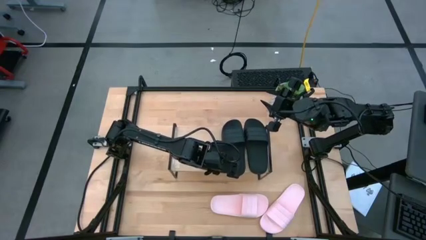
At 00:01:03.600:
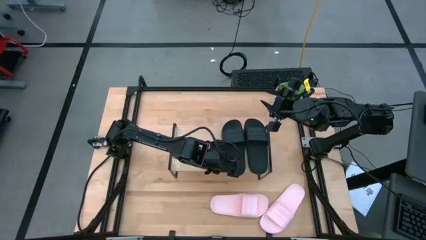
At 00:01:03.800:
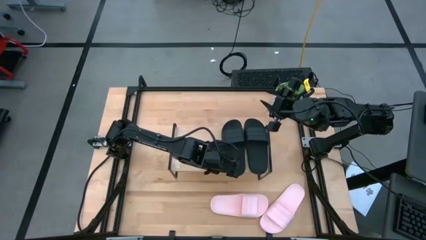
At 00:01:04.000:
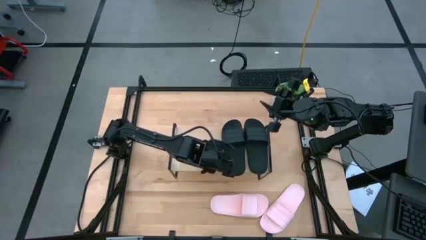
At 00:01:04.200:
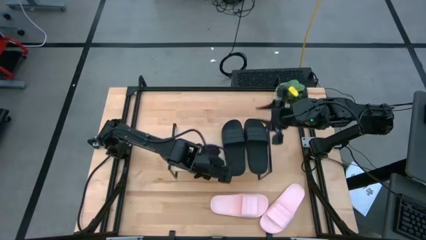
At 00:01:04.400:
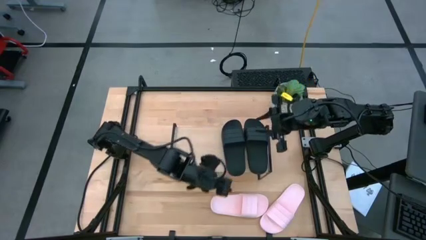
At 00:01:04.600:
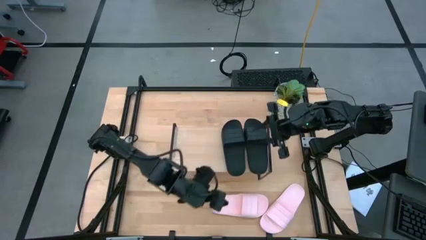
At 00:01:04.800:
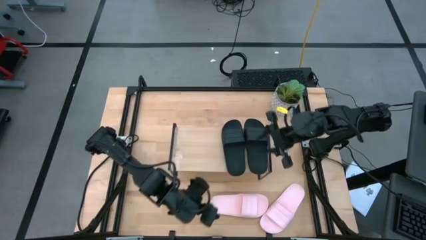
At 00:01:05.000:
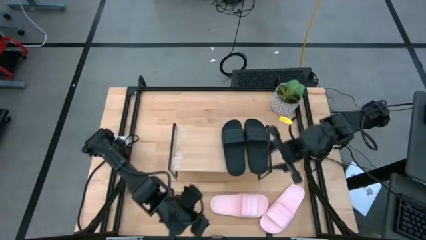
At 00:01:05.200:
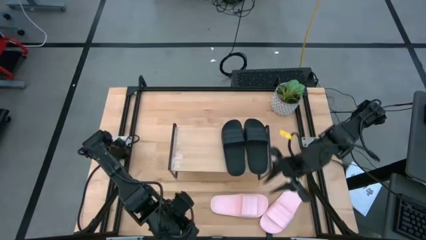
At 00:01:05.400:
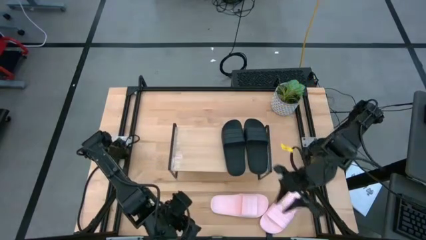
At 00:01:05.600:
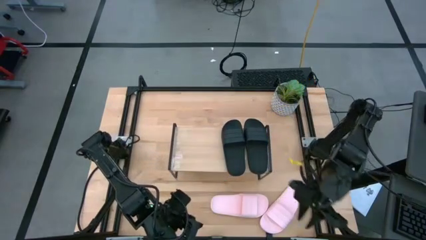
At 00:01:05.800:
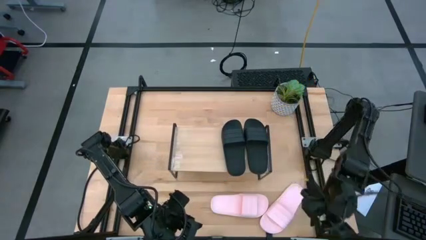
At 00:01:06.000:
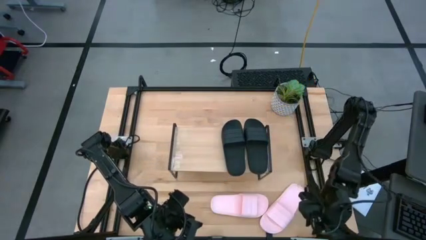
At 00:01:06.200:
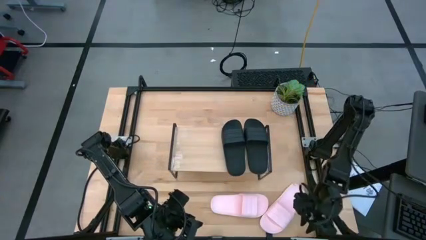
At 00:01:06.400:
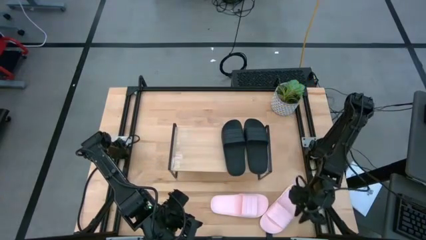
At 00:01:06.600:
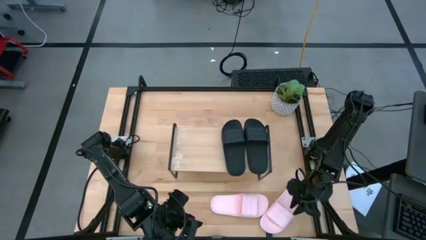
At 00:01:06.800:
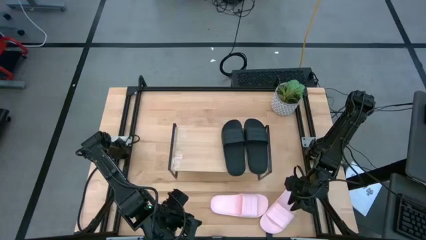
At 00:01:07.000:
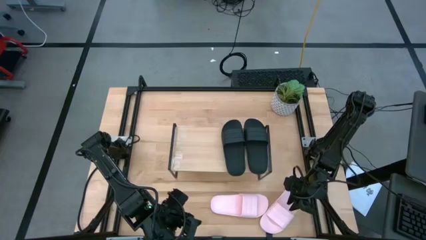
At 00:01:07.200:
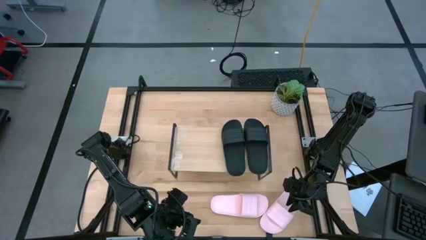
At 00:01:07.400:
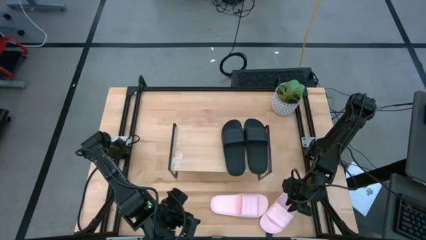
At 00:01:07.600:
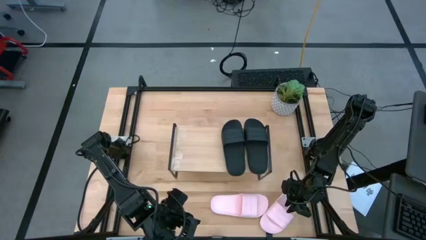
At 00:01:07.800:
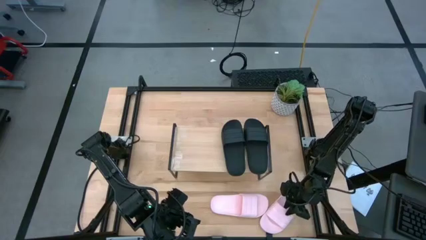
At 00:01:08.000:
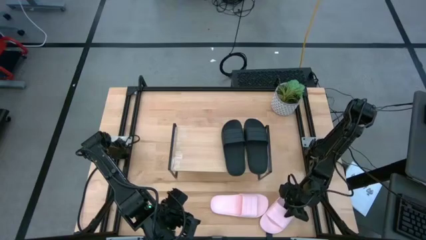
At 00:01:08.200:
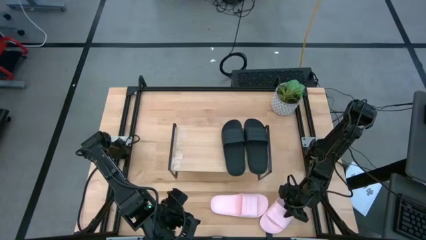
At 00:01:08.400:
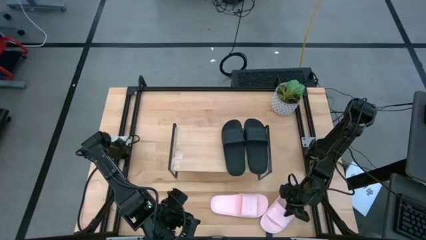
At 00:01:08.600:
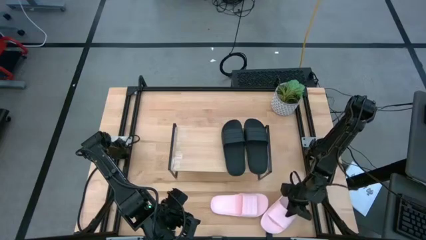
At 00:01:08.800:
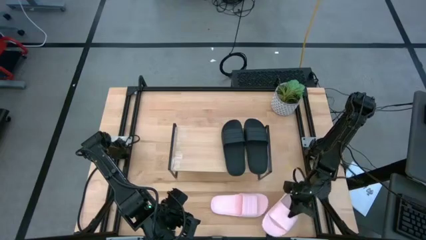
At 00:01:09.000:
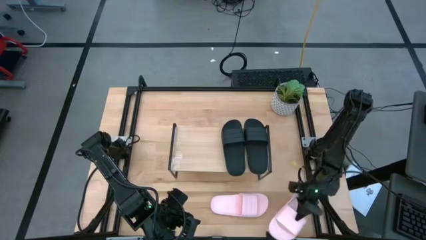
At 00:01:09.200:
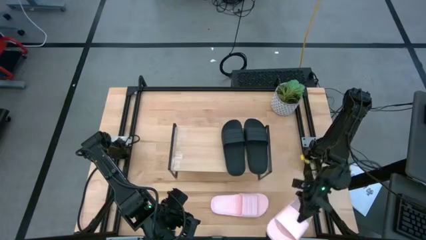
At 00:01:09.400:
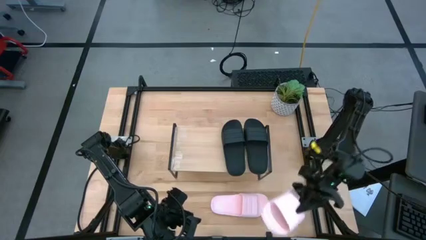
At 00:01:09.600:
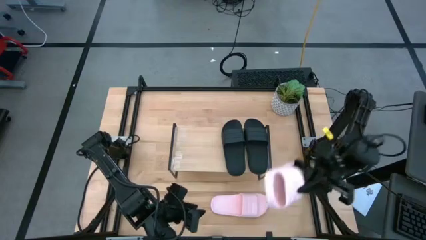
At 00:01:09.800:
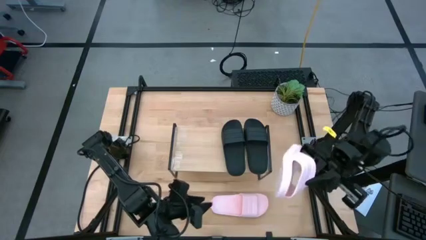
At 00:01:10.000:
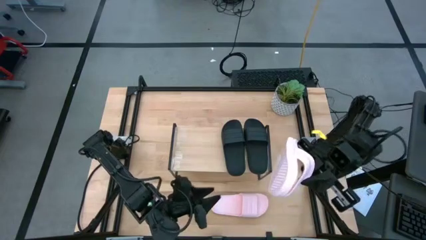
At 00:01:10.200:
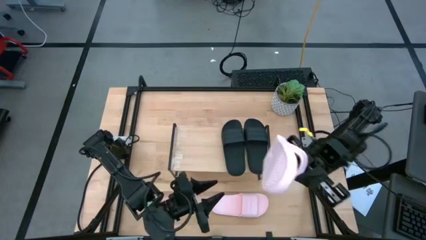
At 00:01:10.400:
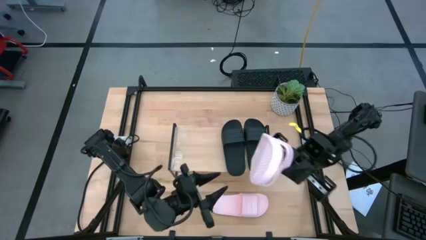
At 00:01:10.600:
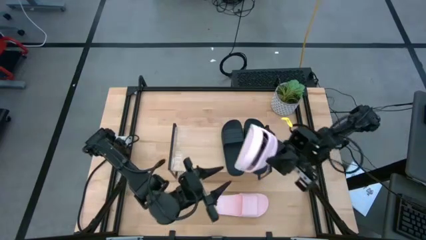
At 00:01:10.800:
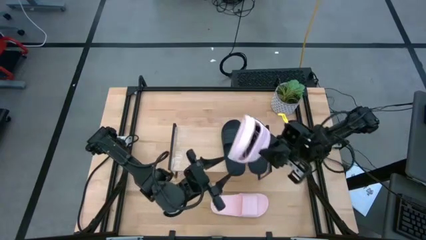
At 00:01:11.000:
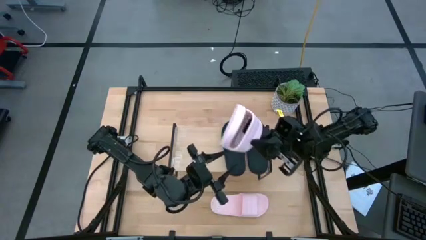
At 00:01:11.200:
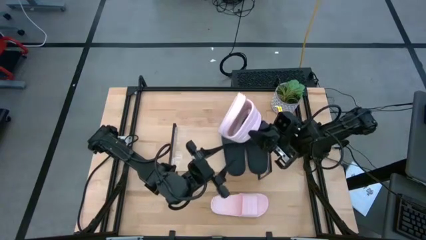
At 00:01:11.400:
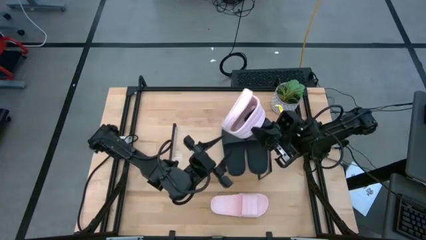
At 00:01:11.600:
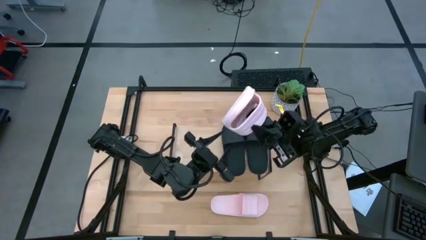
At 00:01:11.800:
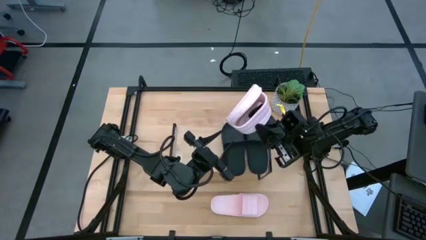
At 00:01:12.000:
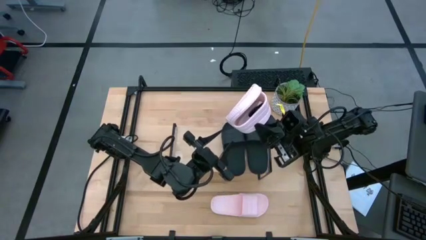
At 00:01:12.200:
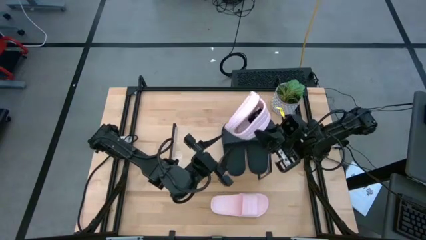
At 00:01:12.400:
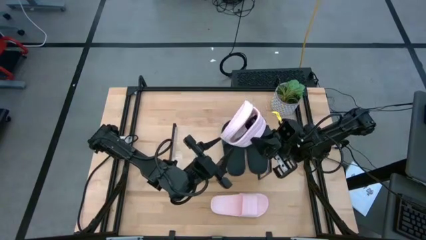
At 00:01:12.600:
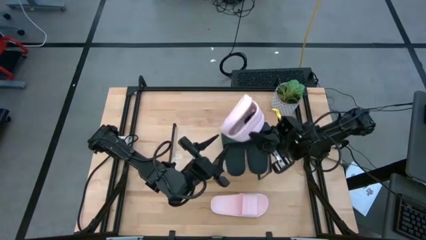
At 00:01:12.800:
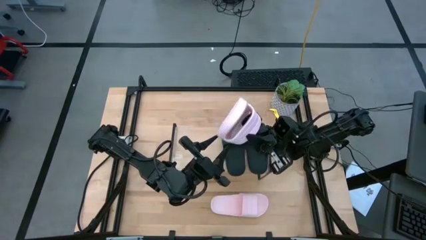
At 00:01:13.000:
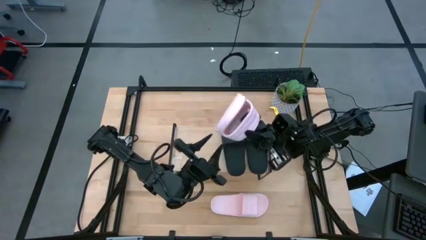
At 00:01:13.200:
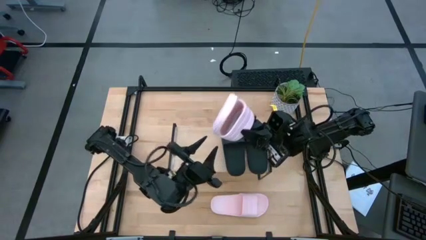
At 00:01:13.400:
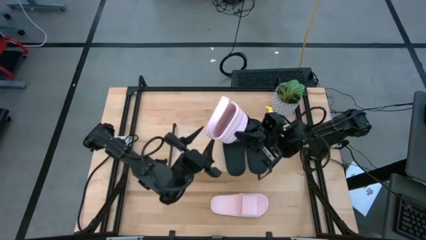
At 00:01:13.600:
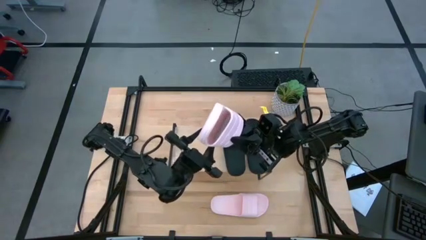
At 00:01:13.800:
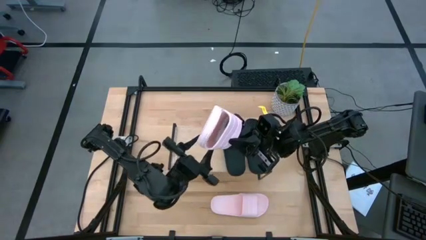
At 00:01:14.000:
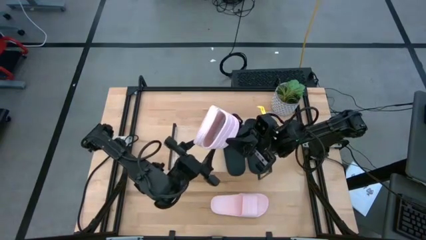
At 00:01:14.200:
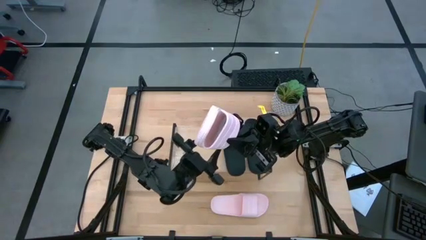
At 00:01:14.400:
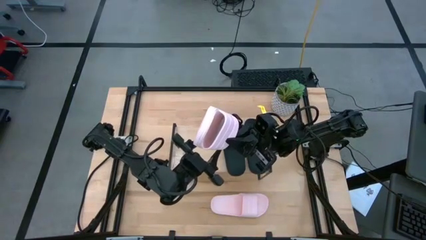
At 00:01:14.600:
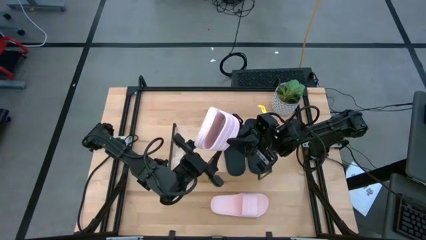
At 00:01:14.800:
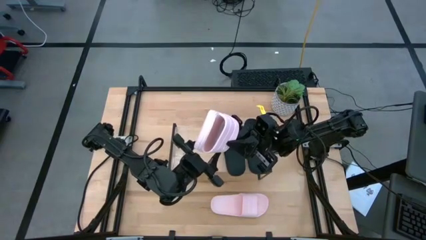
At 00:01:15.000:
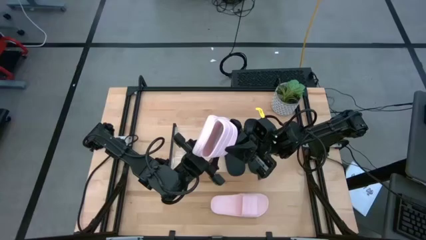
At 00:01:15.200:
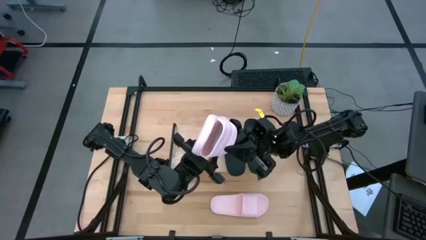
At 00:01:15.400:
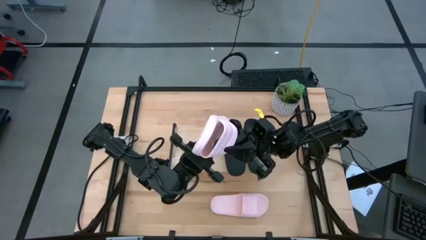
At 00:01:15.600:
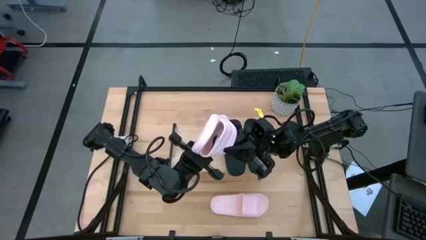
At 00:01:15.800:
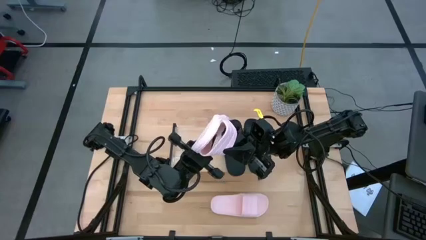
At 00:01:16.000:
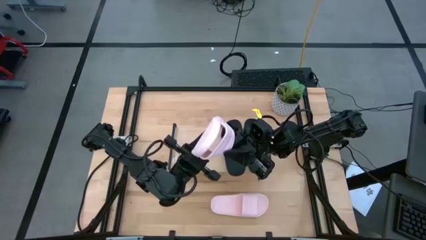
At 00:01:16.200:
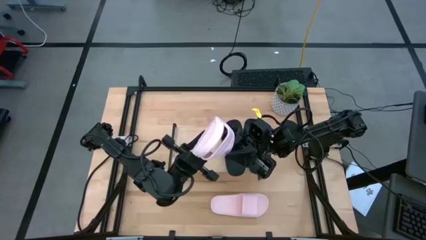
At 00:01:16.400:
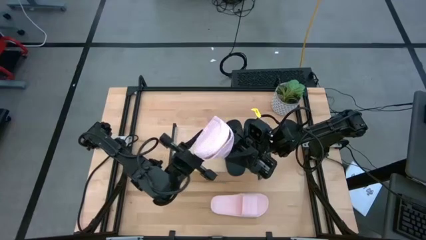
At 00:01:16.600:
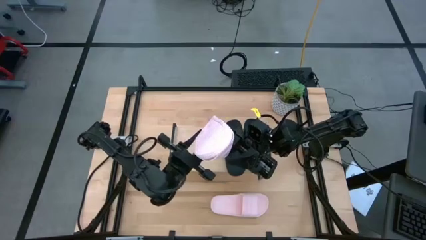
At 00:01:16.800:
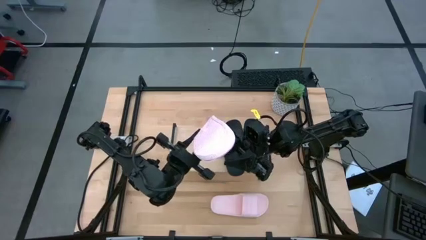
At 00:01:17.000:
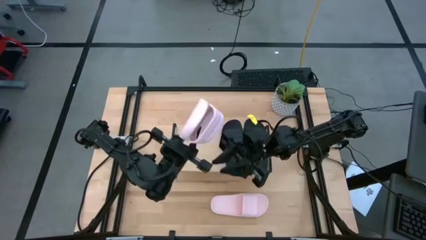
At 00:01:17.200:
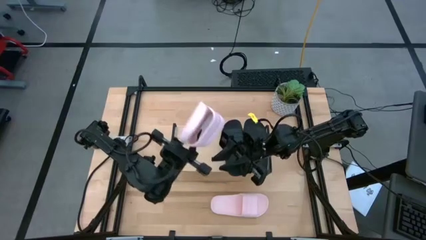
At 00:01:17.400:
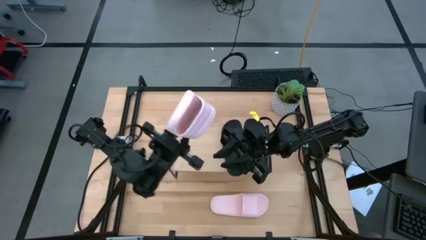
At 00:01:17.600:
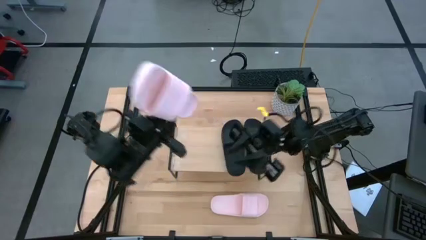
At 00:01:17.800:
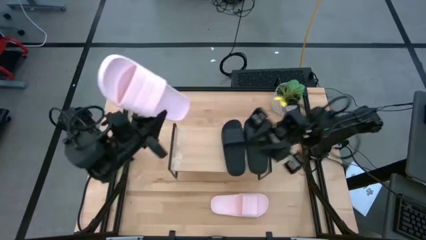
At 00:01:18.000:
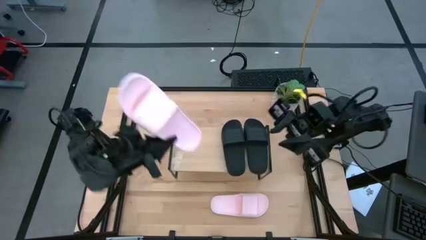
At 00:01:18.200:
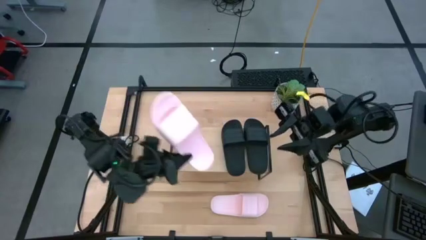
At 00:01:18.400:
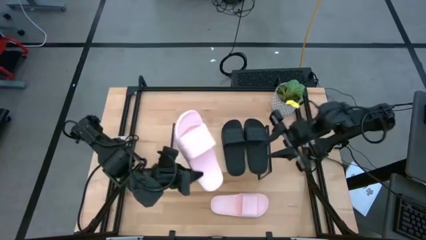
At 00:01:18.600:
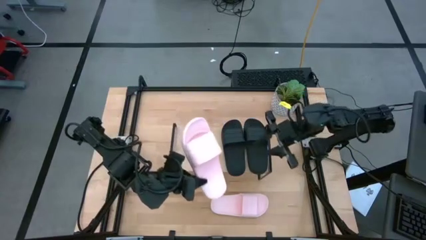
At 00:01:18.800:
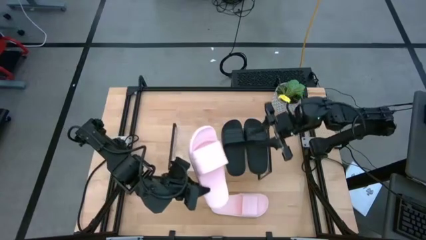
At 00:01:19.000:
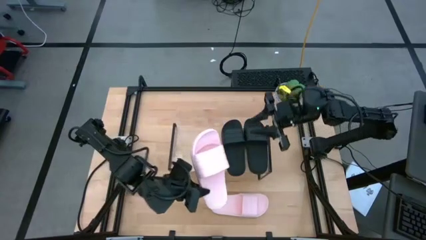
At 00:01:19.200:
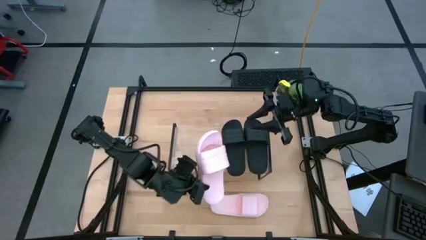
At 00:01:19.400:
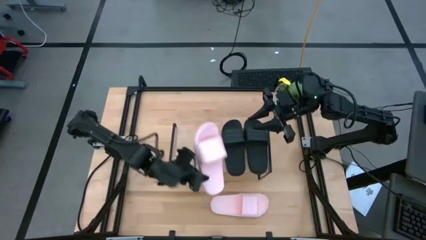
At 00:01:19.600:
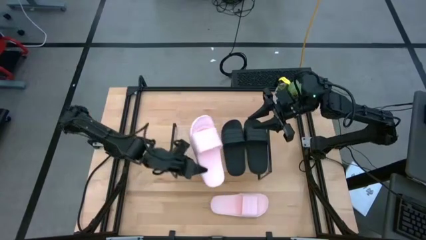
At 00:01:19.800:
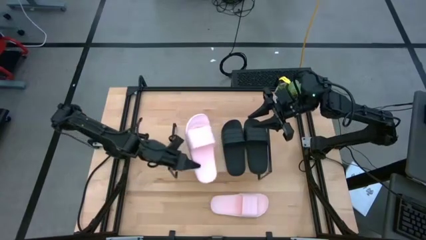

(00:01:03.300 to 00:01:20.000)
Task: Pick and place slides into the shelf
Put the right pink slipper on the shelf
